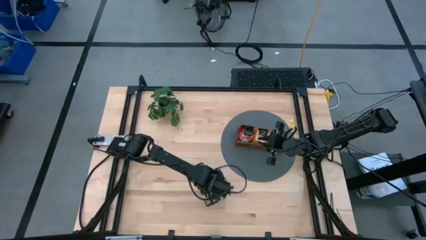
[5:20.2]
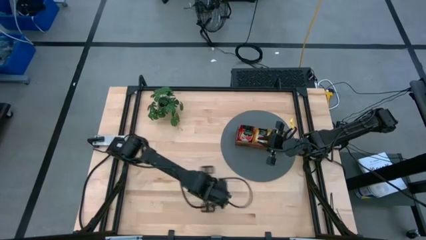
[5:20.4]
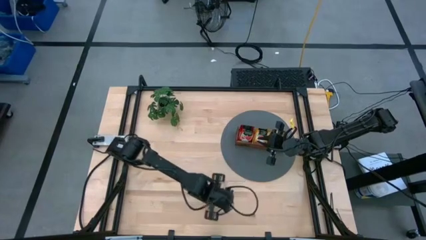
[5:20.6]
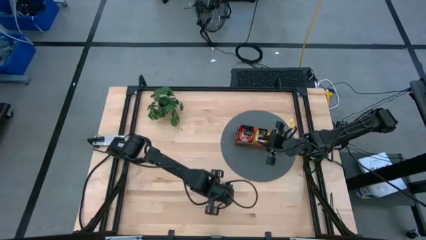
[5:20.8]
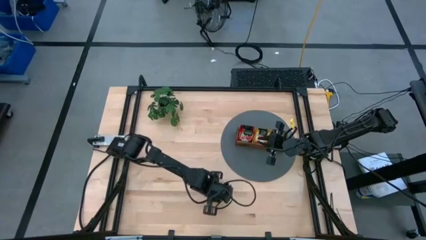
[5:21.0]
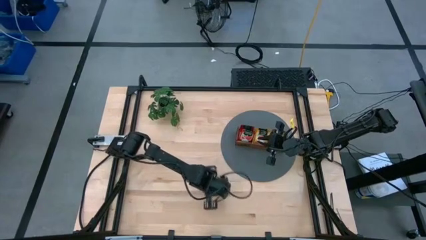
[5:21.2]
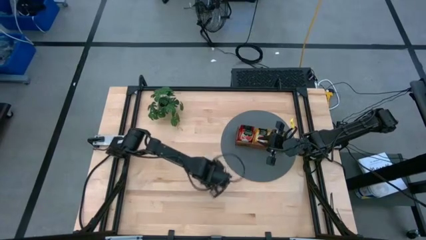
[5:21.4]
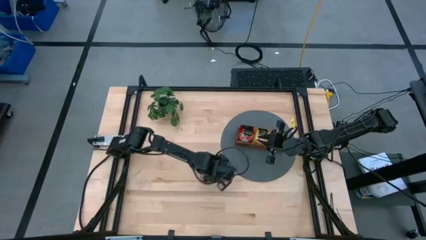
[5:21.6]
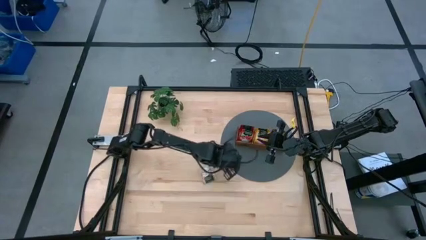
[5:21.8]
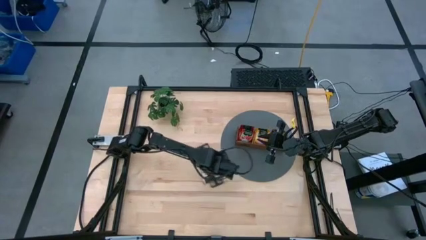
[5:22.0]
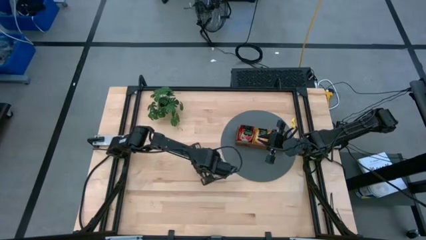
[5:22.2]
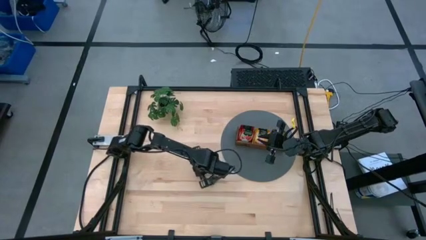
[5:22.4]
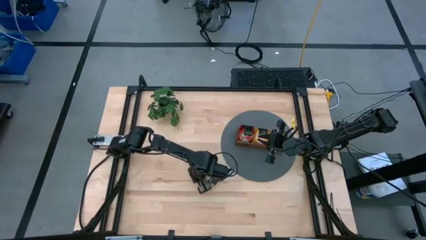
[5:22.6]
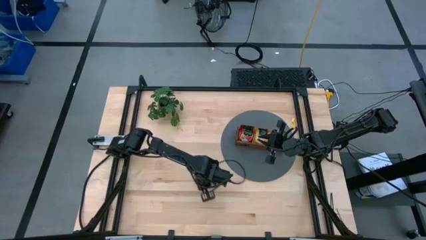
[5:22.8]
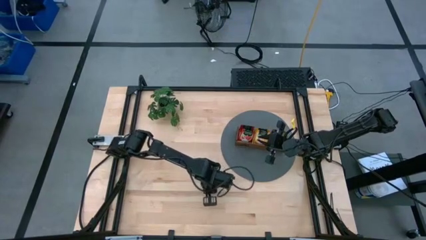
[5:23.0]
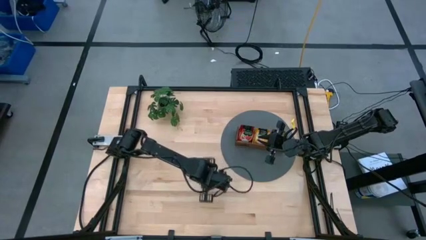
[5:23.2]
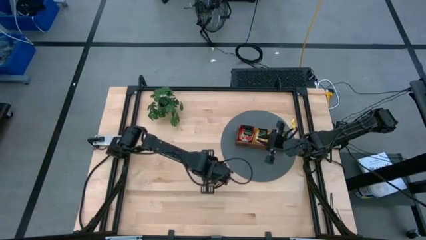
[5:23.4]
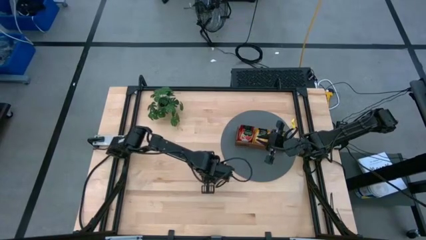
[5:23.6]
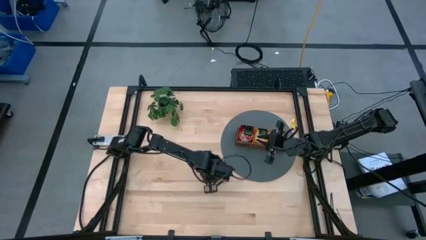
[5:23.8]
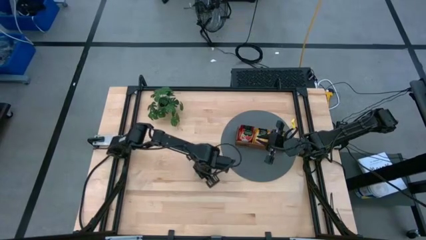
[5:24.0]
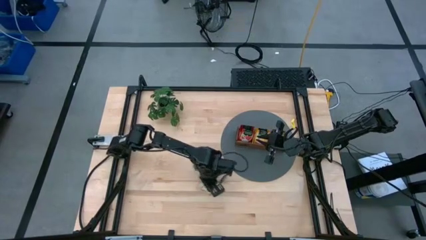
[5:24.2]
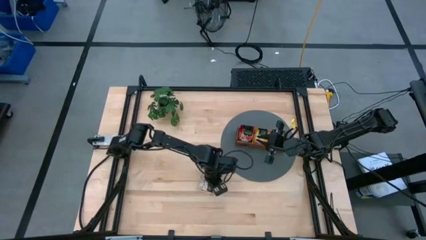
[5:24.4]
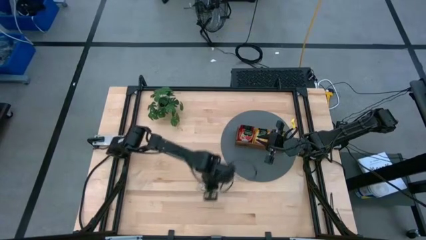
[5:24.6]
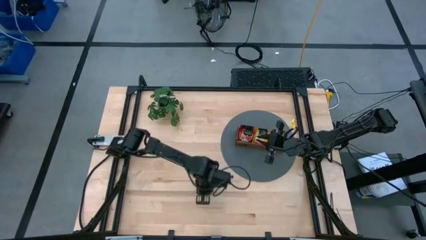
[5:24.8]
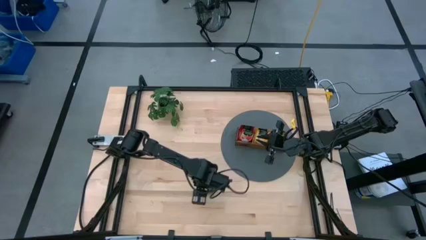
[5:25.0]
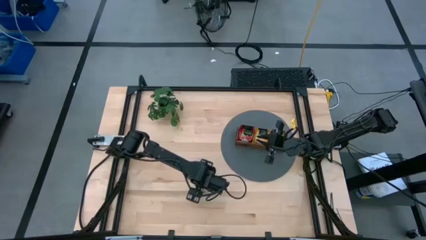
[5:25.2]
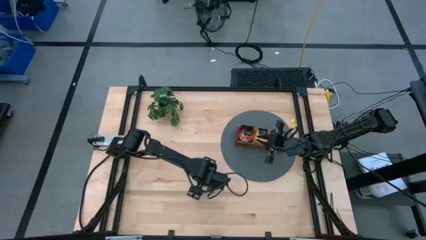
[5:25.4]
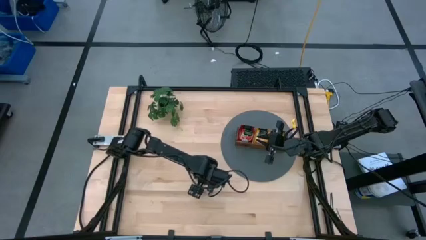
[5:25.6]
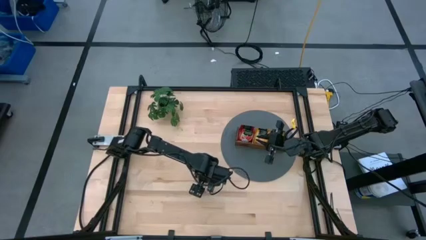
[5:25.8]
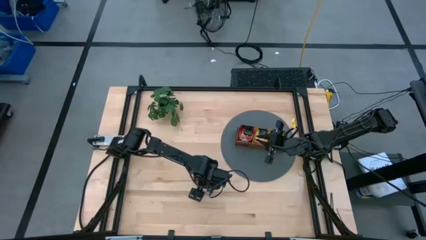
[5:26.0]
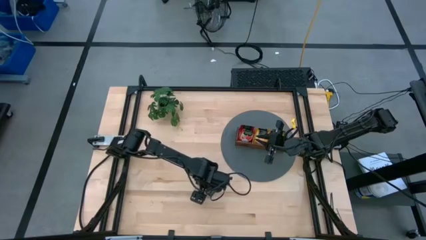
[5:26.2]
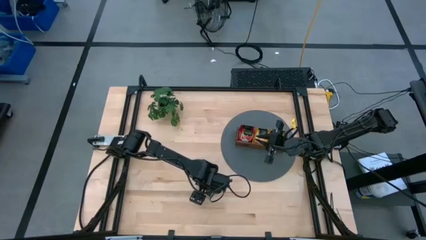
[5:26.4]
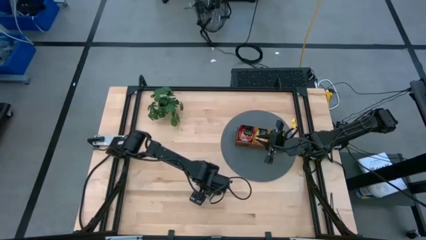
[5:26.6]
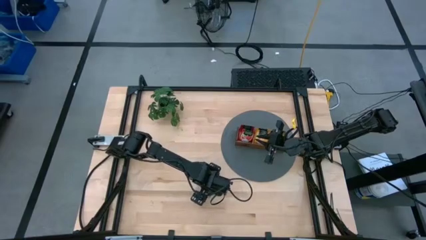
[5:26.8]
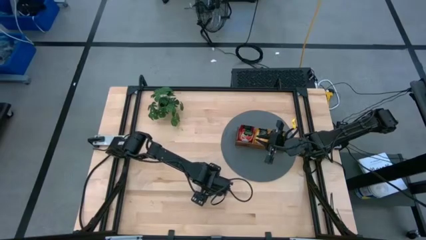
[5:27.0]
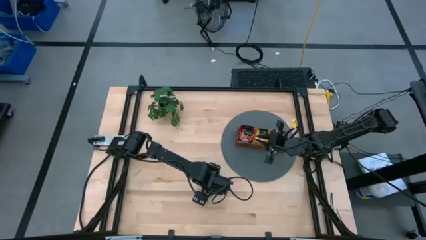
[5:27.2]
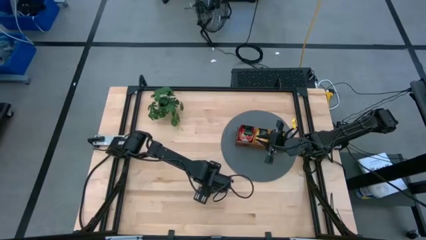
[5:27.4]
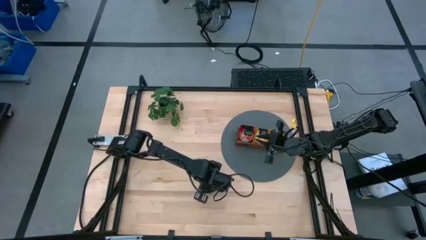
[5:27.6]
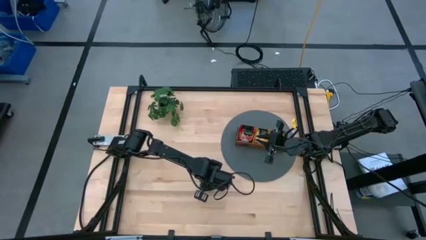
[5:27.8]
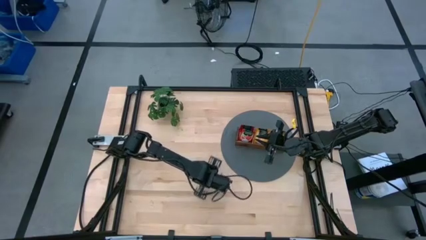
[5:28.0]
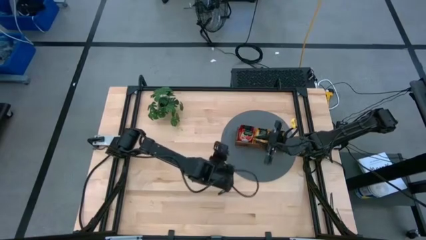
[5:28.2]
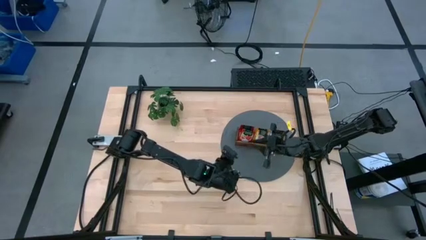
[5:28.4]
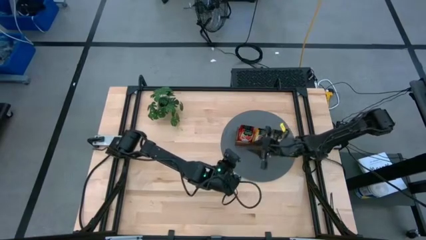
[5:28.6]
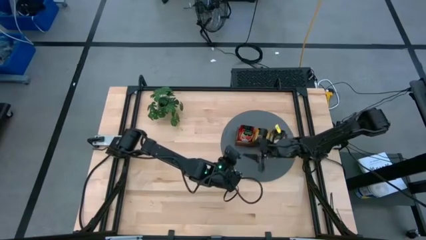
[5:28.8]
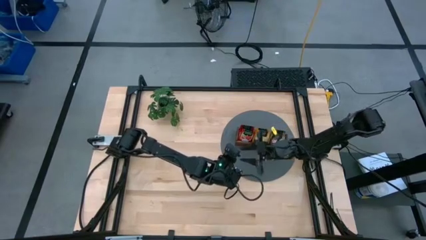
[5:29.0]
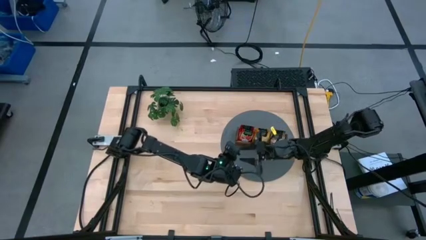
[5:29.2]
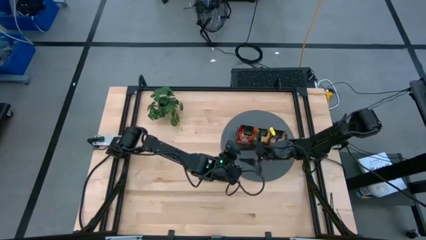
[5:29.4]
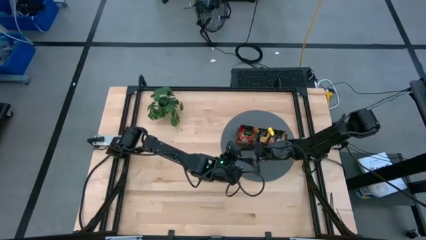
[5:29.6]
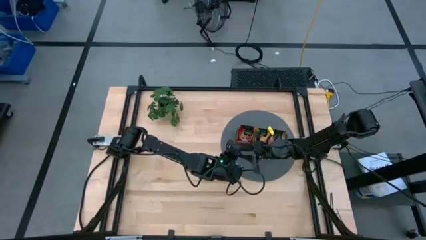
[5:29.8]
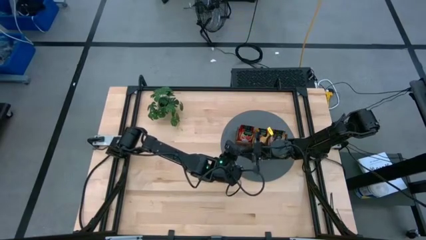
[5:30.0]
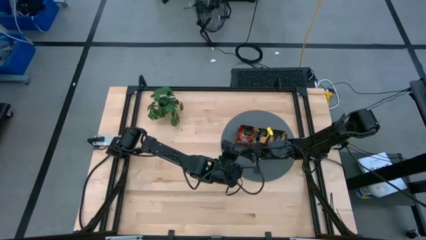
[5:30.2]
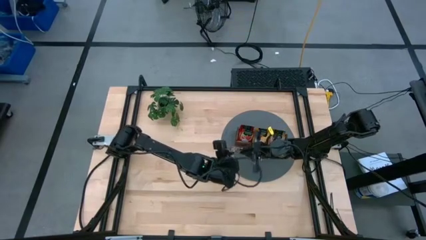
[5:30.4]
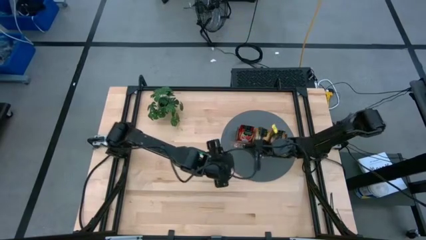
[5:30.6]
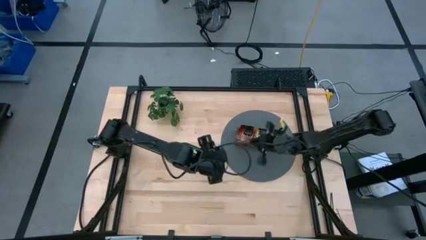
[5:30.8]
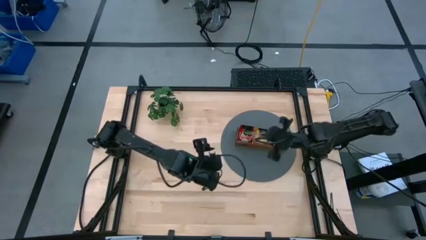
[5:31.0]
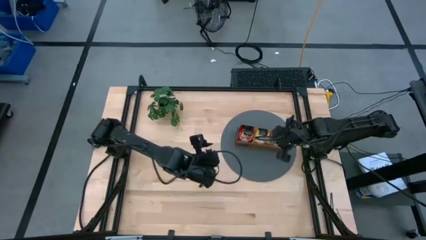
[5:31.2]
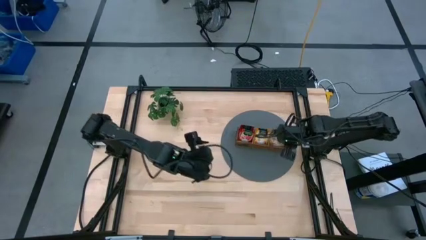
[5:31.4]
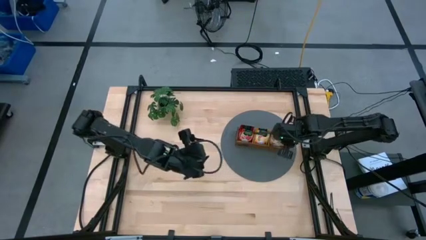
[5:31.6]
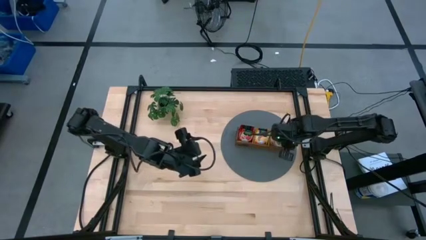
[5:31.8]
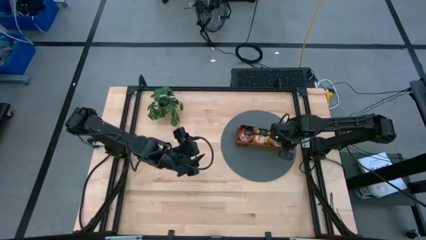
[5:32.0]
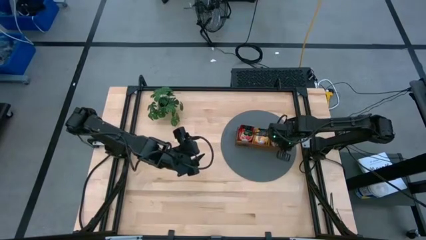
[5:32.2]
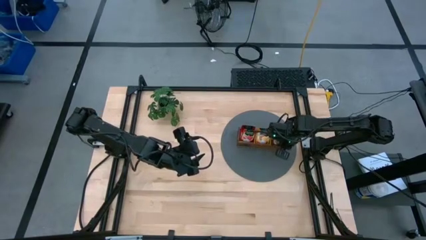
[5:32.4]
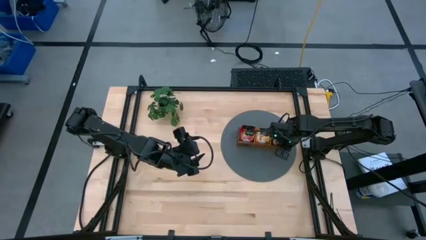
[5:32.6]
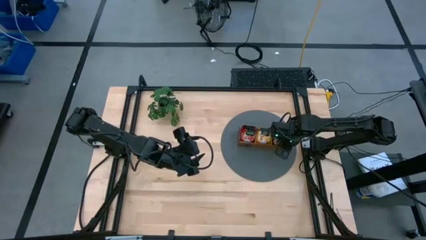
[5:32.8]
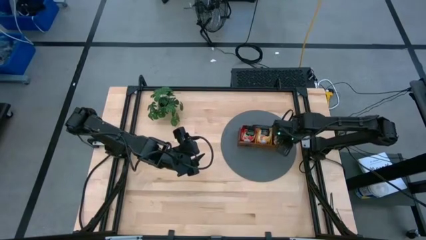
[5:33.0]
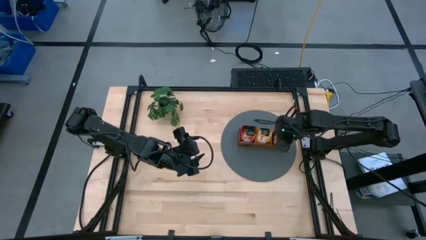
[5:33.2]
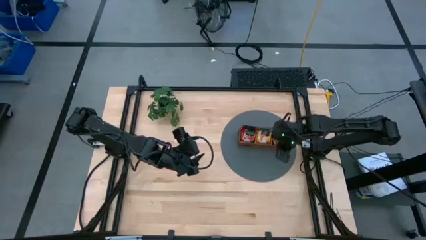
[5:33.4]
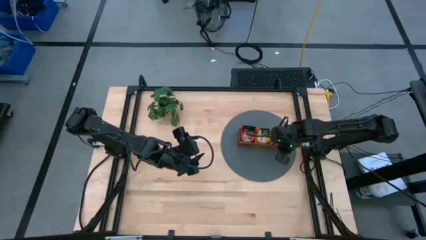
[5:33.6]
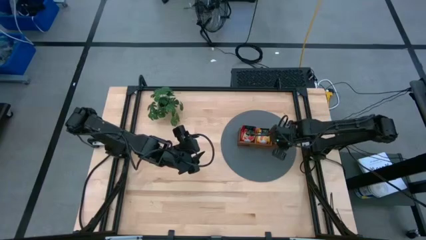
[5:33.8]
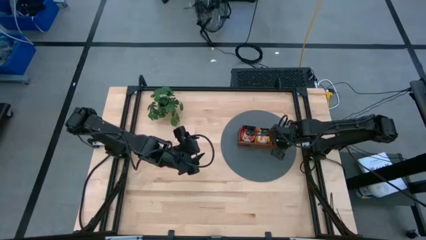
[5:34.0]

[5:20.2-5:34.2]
Task: Pick & Place Tea
Put the brown tea bag into the right of the wooden organizer

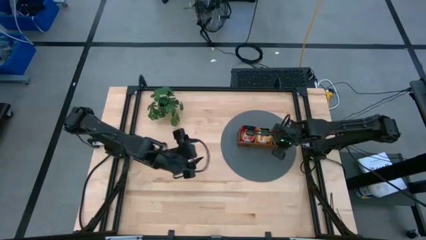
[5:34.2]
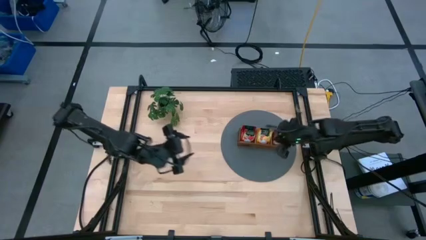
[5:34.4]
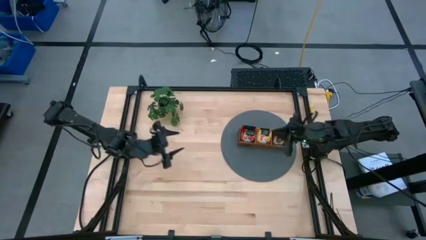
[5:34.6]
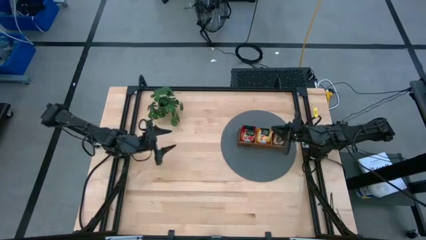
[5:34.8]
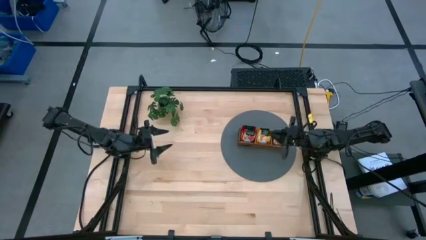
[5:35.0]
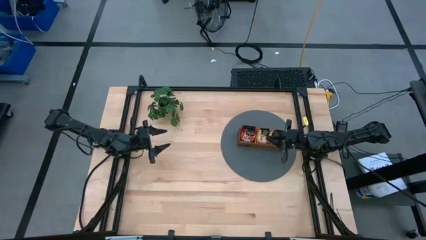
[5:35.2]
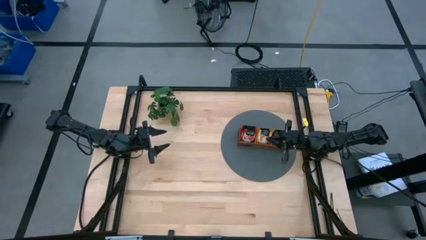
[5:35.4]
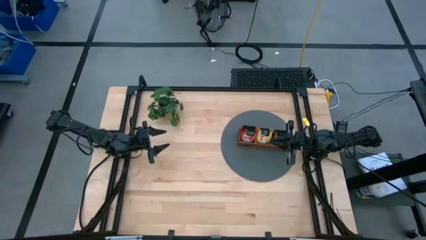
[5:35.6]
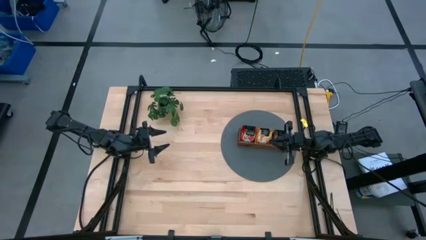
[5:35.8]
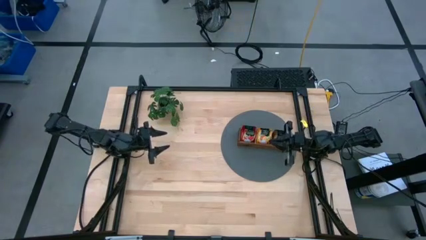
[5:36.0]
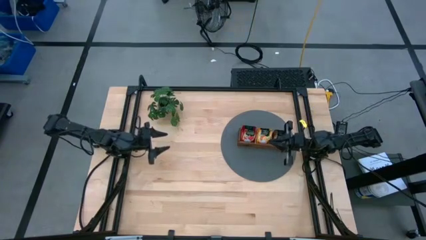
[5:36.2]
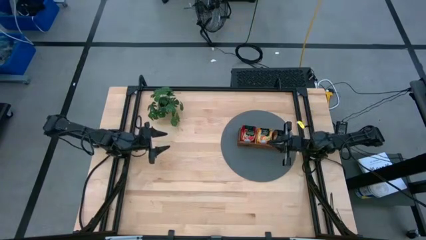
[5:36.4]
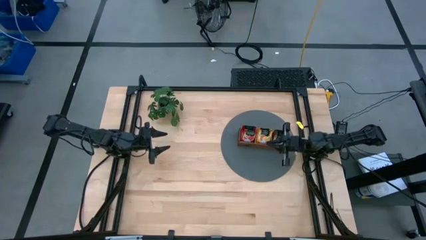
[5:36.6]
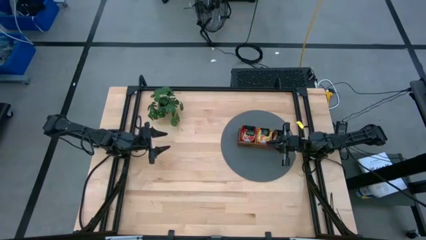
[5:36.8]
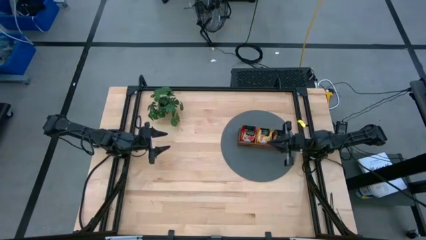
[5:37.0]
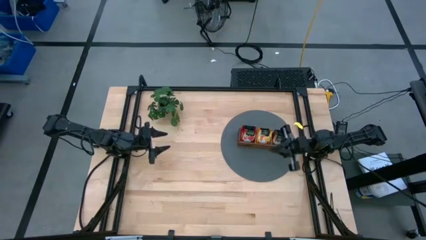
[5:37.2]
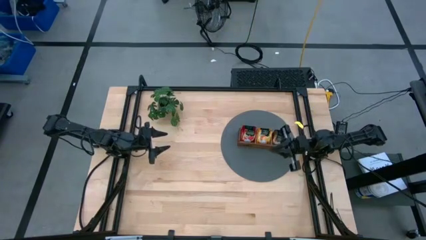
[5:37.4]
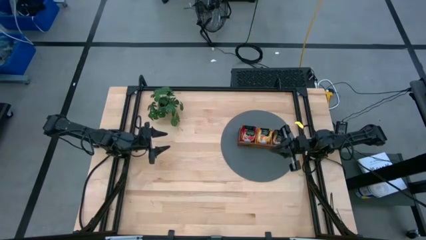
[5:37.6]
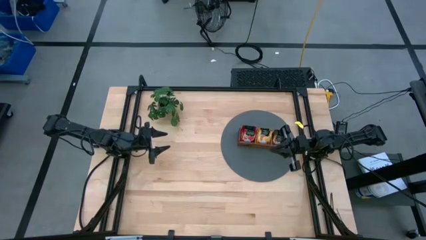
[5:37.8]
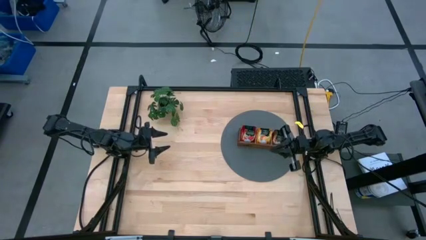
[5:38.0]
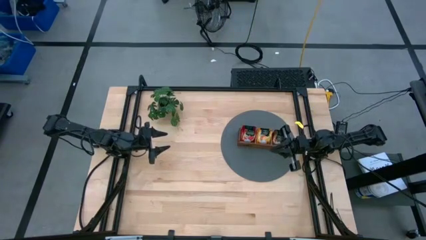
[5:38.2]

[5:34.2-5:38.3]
Return to Home Position
